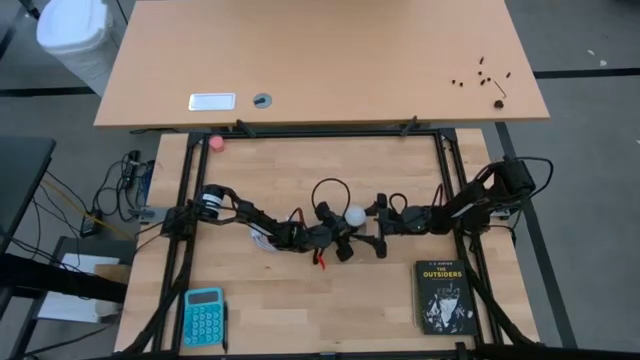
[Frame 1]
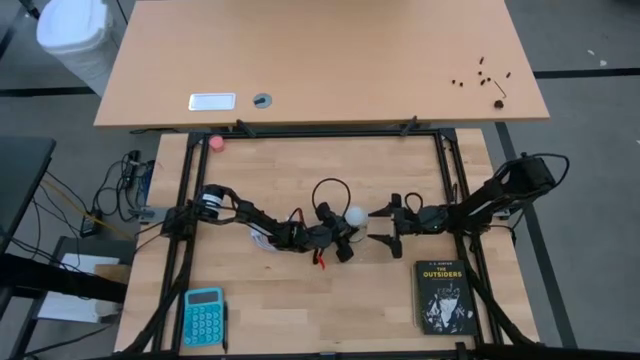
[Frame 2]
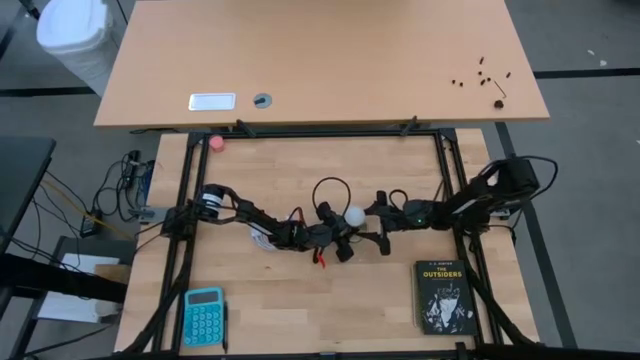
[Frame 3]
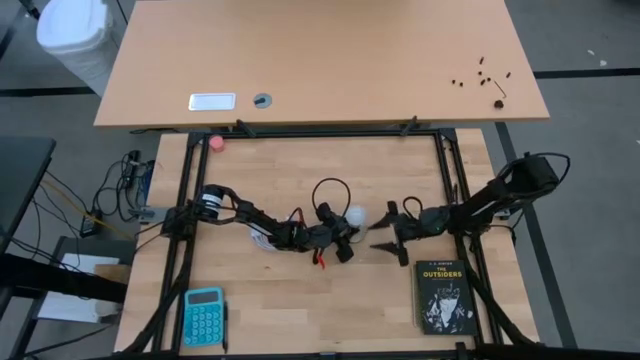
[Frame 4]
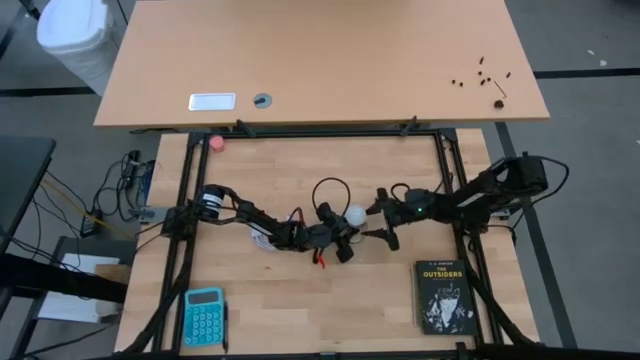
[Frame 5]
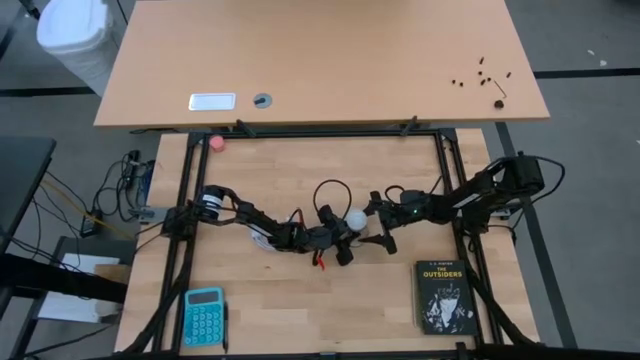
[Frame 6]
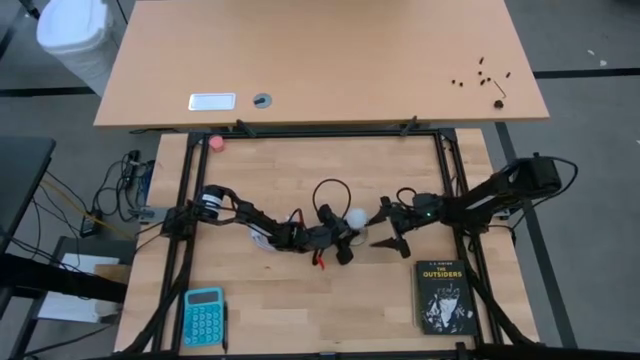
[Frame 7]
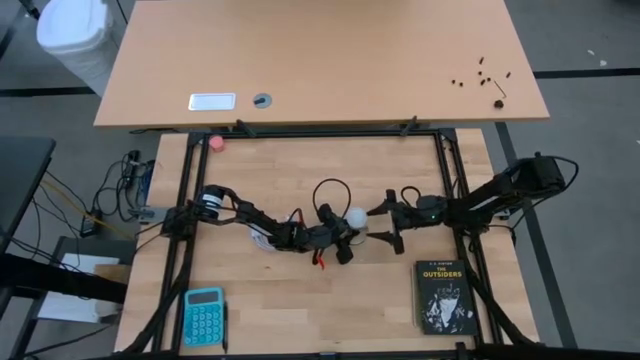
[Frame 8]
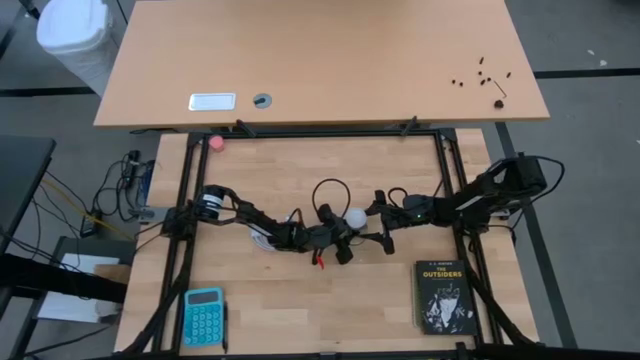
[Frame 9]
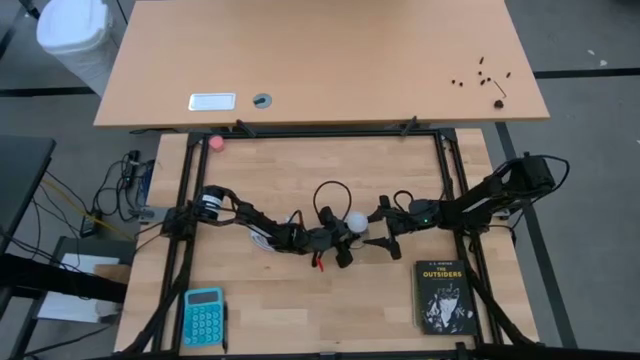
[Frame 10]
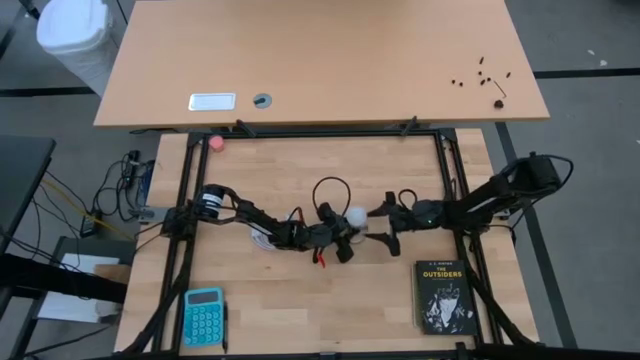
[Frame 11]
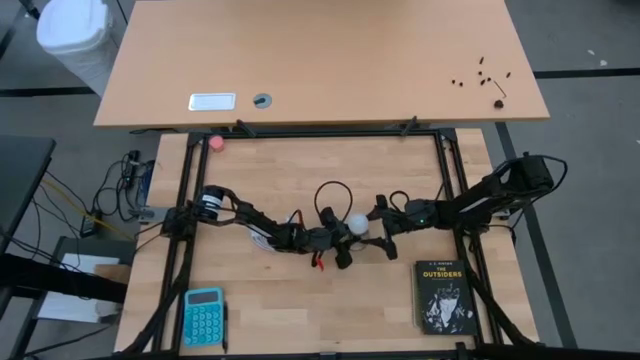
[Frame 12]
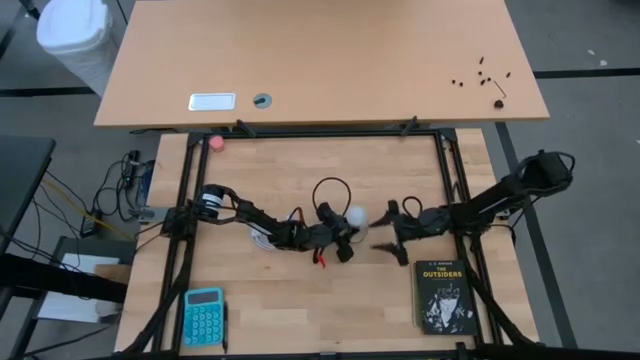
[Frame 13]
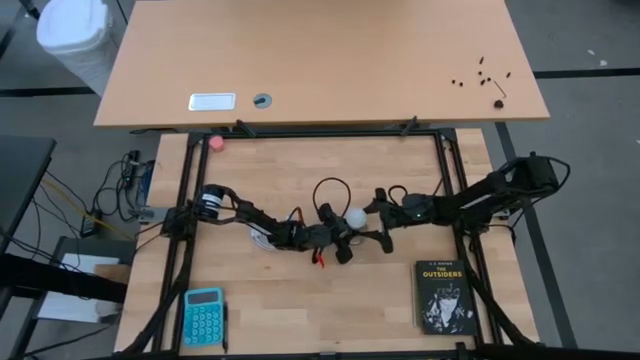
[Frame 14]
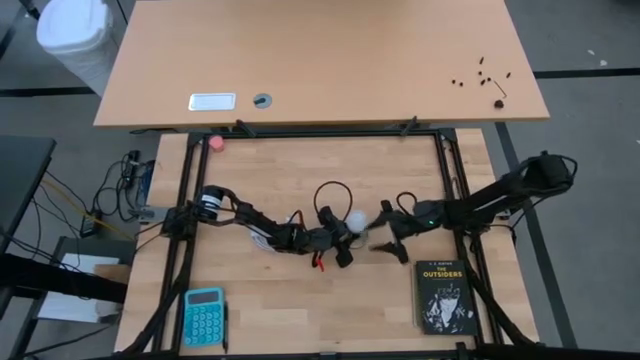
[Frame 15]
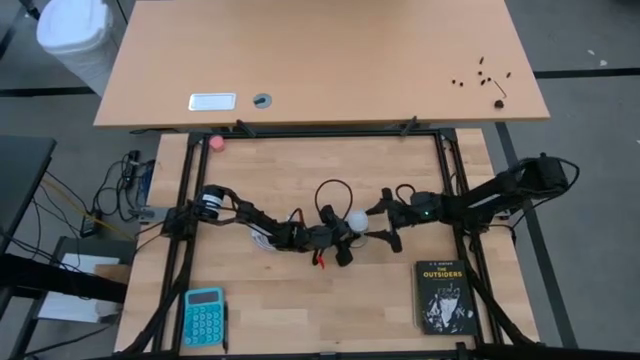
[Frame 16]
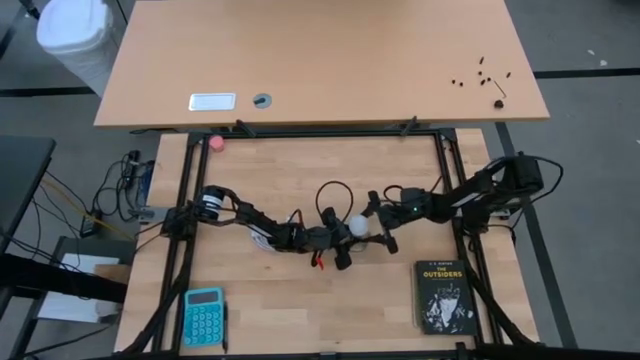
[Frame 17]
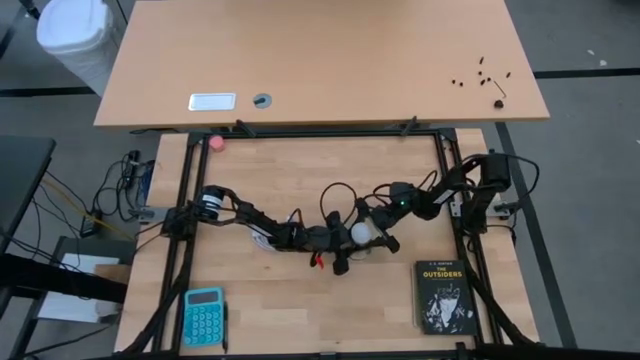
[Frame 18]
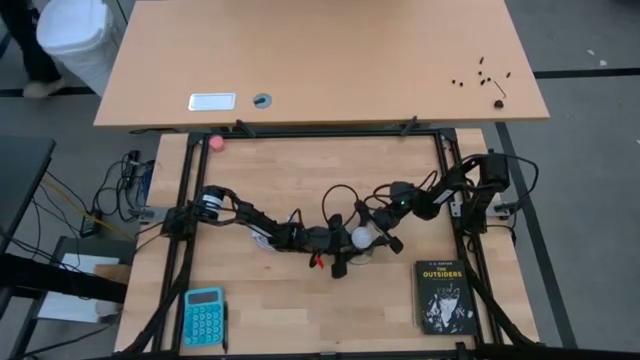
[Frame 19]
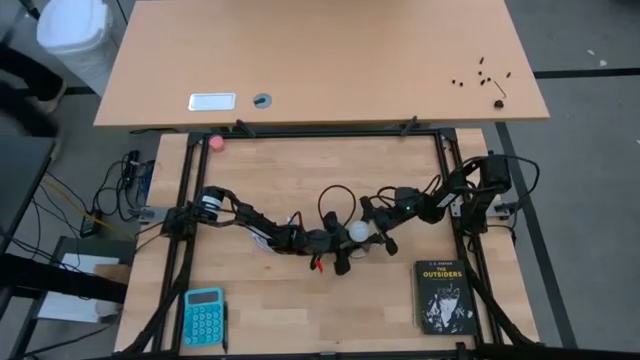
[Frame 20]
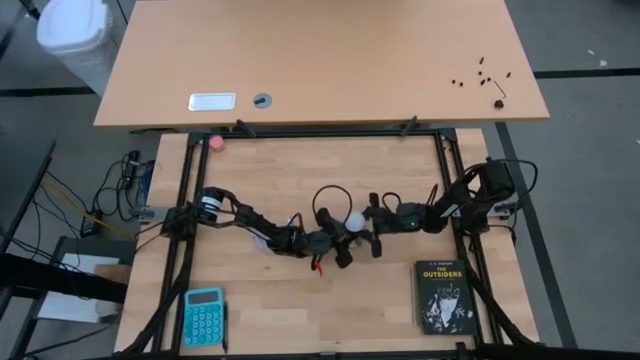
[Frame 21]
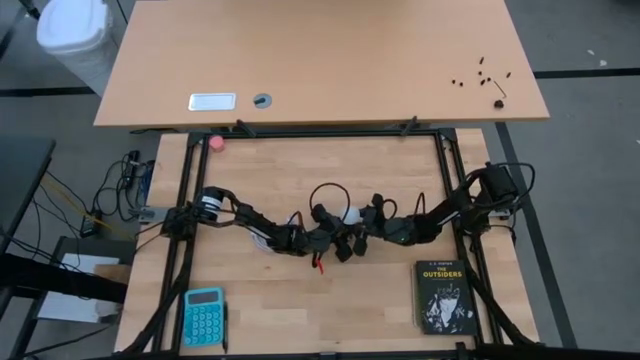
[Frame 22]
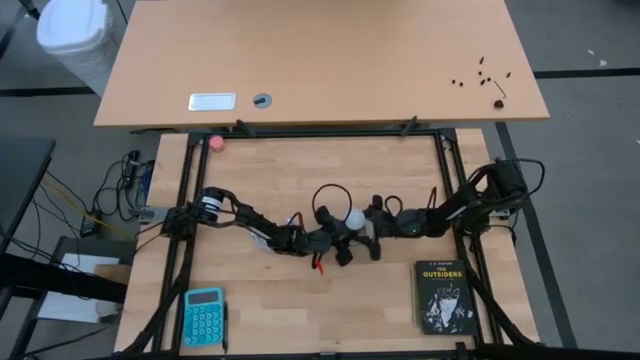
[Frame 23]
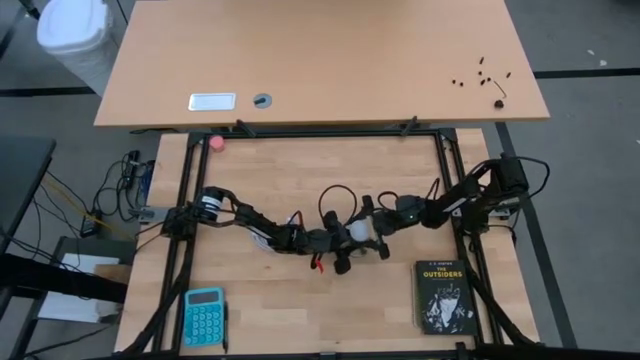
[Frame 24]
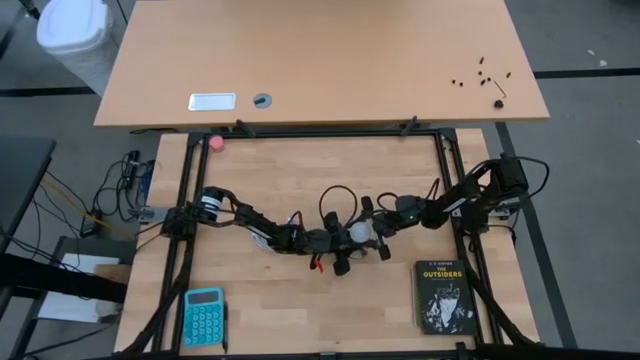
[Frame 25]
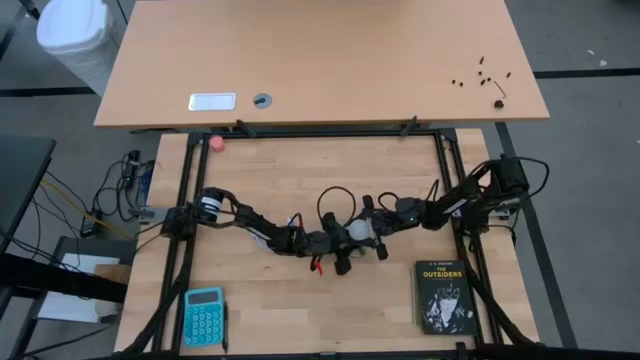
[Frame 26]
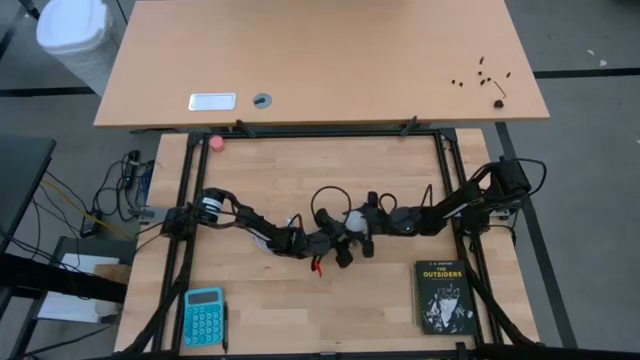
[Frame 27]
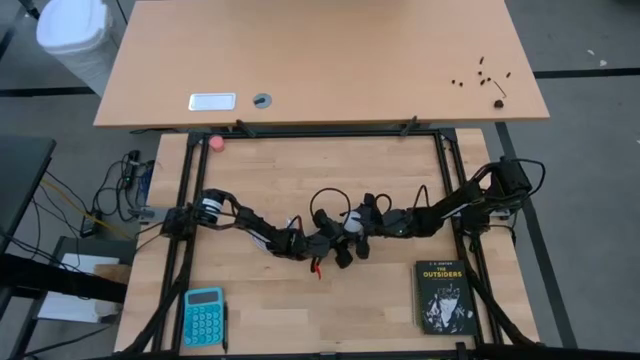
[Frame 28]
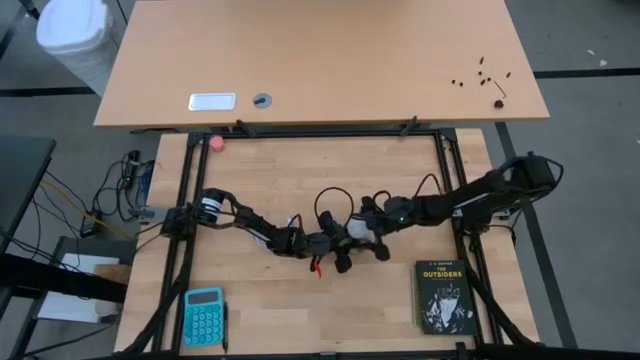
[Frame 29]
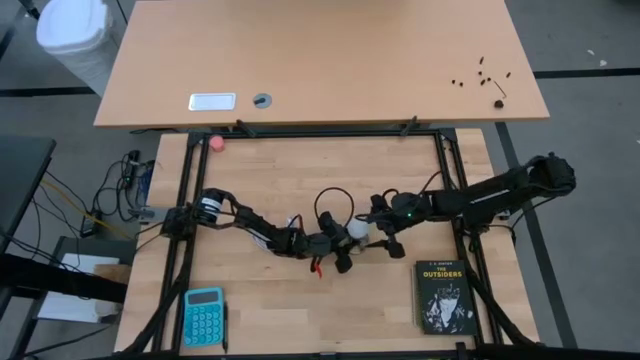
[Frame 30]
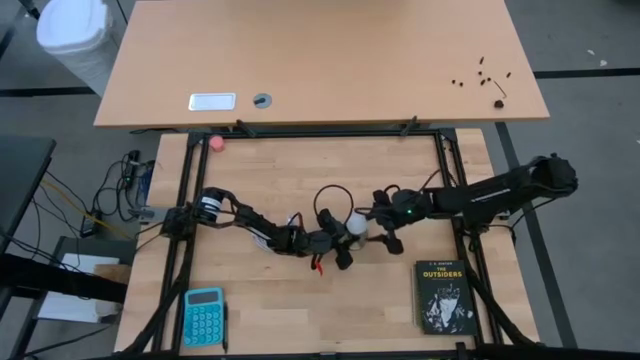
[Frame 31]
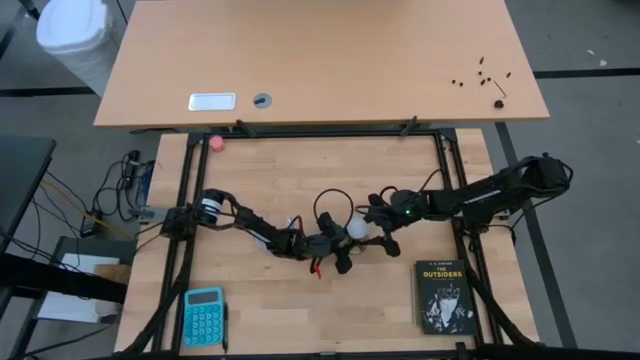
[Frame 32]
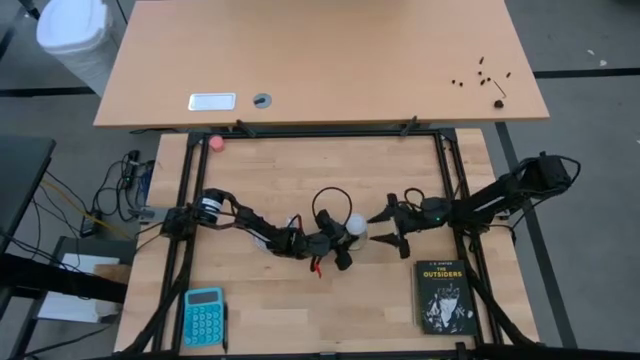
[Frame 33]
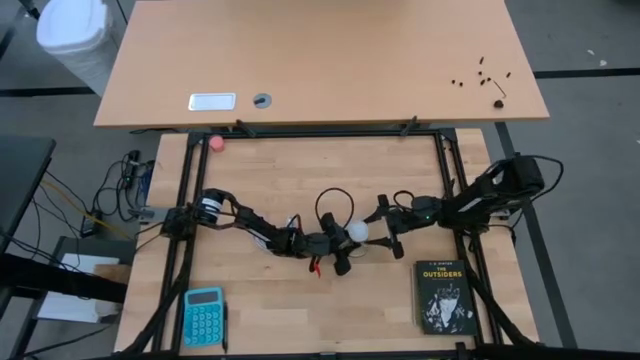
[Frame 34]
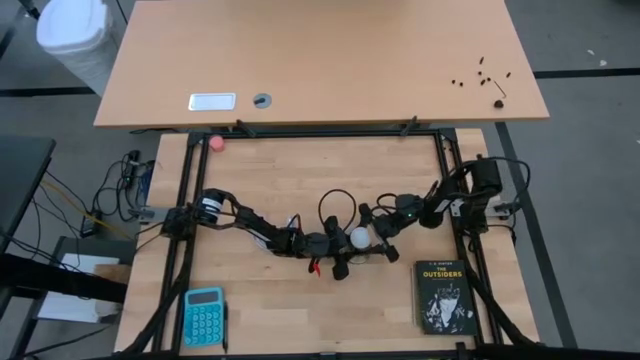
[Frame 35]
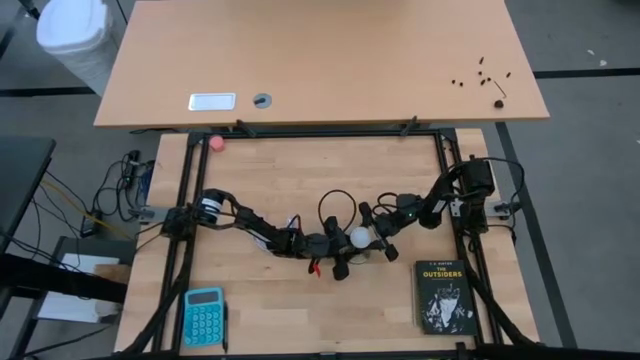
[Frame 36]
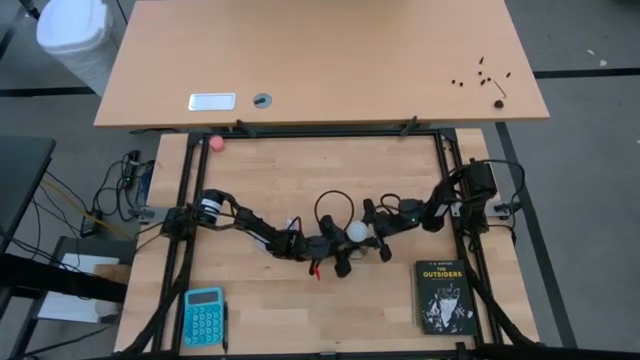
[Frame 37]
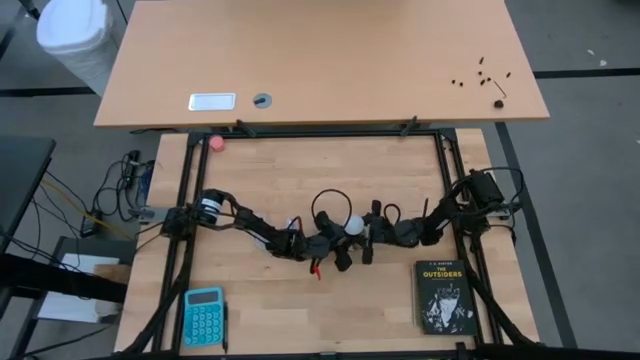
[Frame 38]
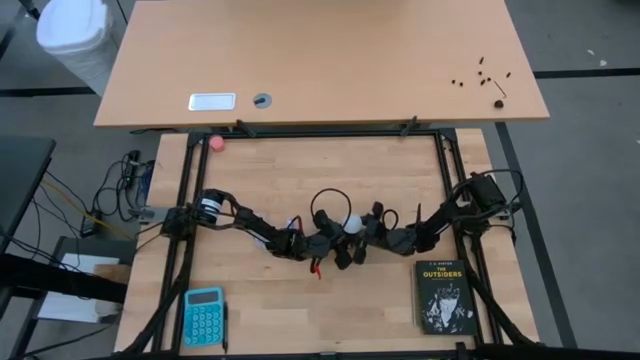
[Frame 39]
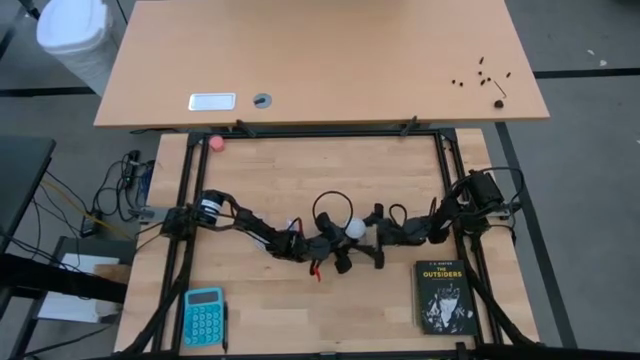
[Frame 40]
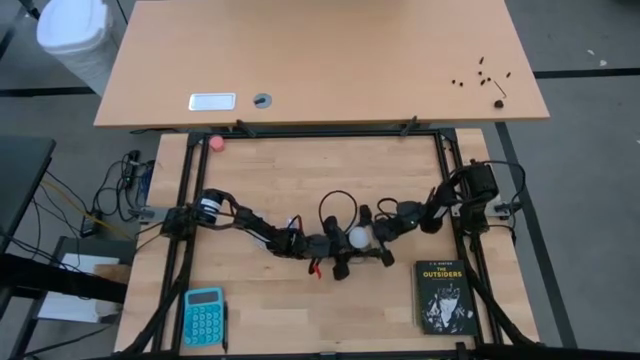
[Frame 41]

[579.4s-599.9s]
Task: Screw lightbulb
Insert the white lightbulb into the silver lamp
